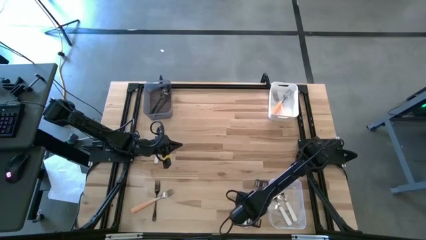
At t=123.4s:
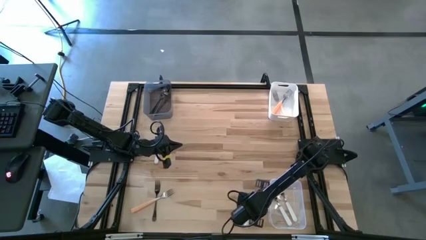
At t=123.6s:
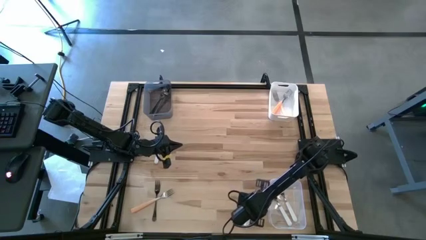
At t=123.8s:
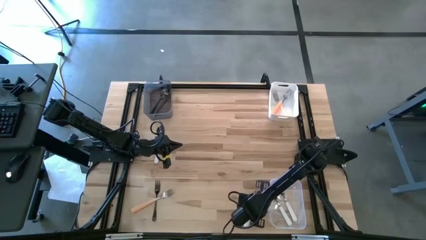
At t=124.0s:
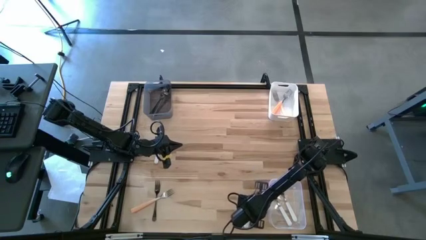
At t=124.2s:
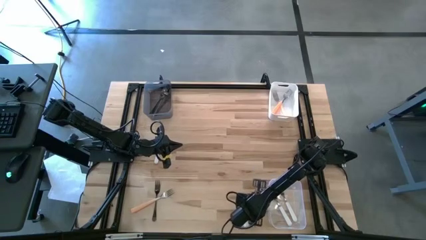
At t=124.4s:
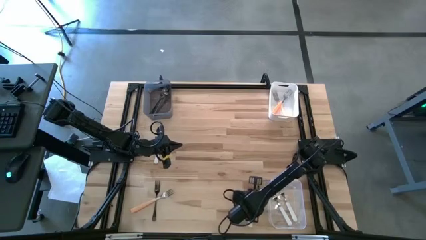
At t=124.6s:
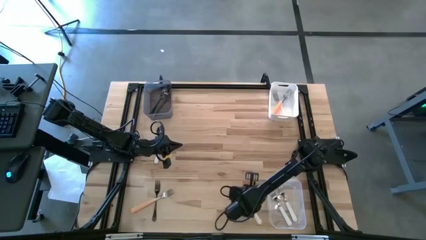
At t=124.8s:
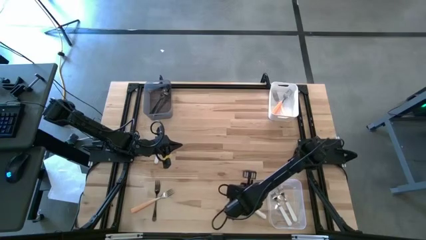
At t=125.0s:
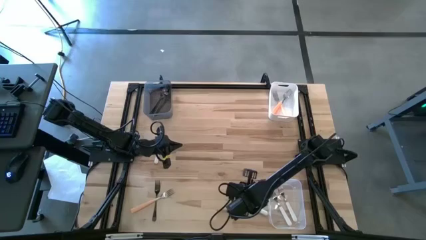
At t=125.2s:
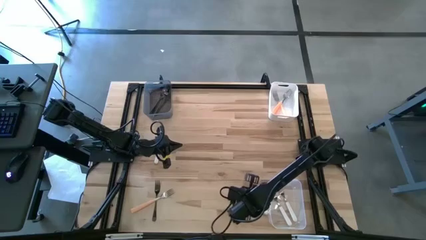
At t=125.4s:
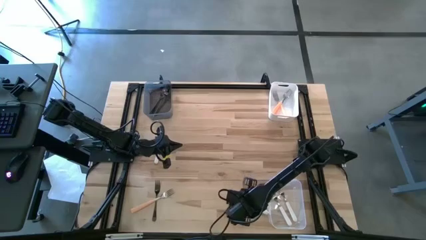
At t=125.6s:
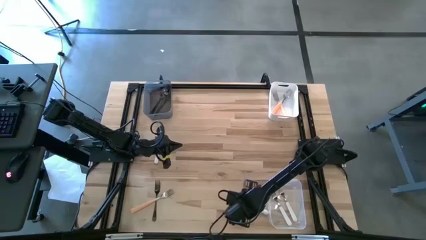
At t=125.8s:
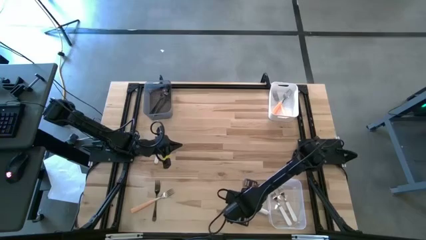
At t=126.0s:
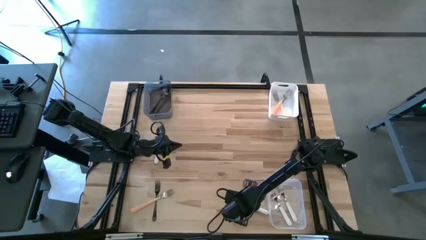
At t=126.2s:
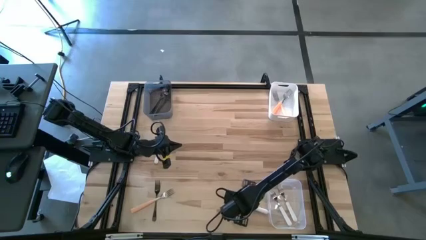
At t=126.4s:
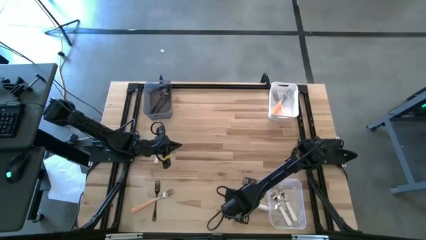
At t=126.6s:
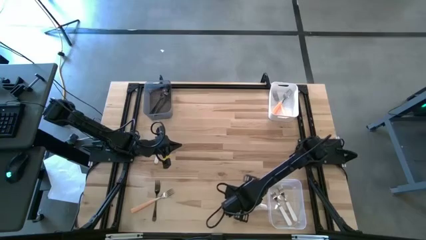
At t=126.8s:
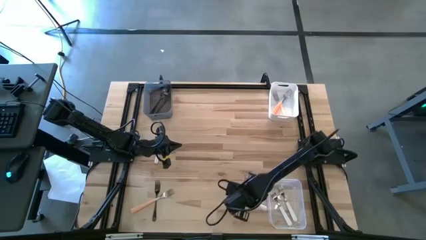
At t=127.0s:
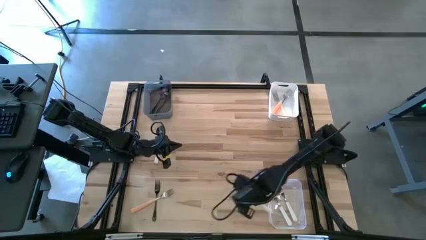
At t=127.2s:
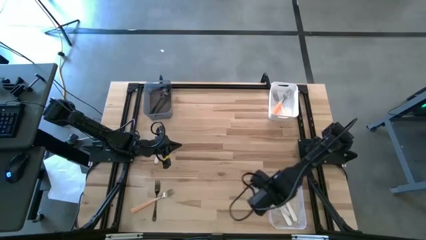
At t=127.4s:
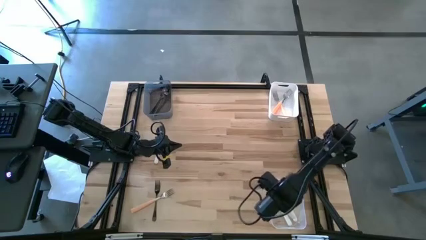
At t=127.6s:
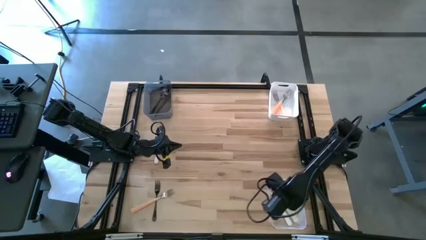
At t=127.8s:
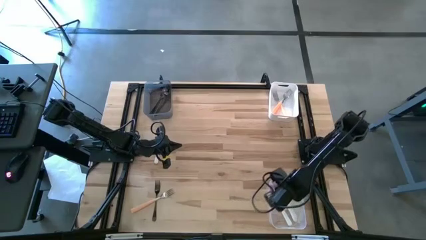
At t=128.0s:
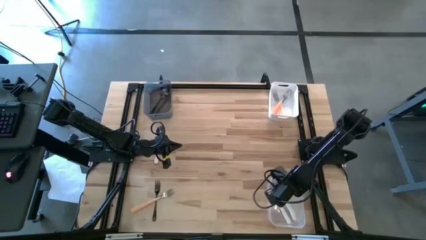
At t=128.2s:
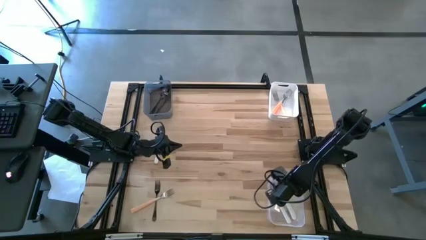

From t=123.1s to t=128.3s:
Task: Sort silverware by color (type)
Put the bottom white fork into the transparent bin

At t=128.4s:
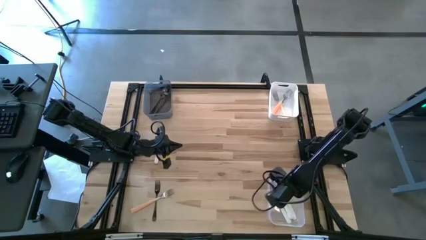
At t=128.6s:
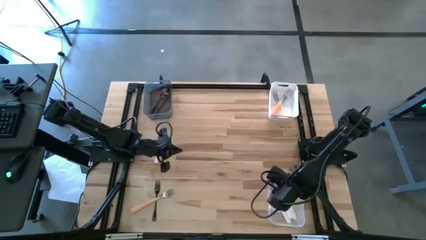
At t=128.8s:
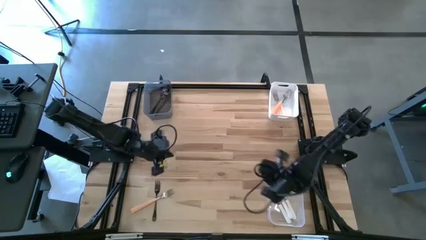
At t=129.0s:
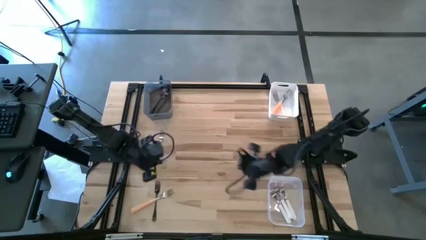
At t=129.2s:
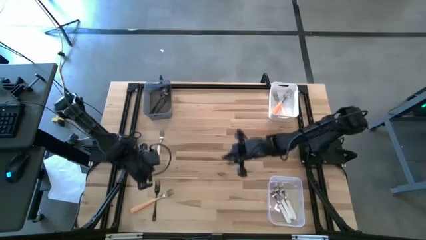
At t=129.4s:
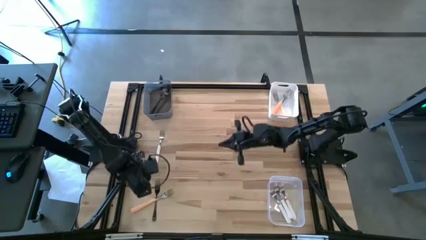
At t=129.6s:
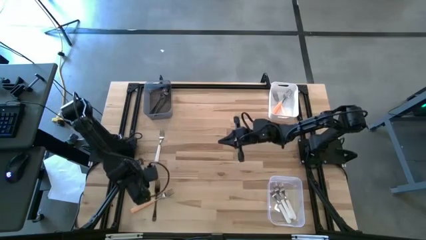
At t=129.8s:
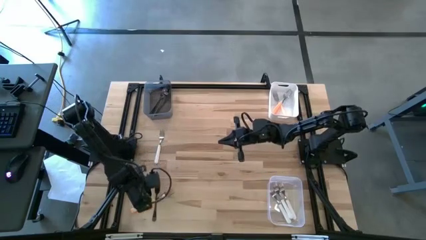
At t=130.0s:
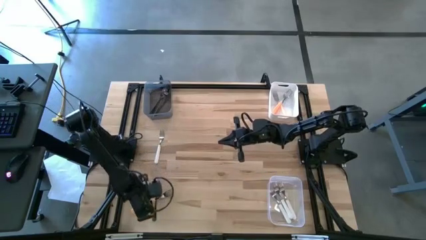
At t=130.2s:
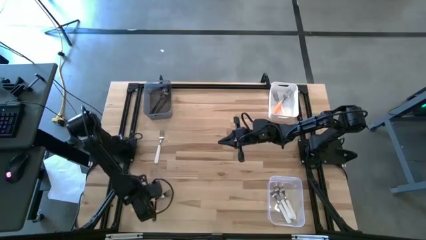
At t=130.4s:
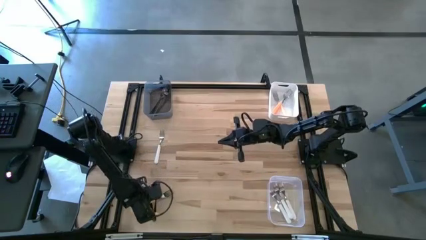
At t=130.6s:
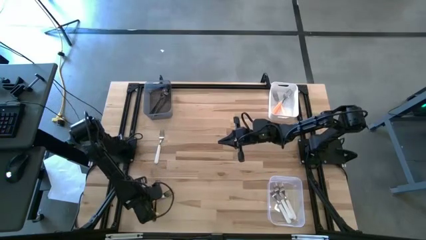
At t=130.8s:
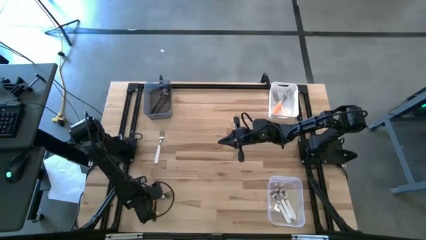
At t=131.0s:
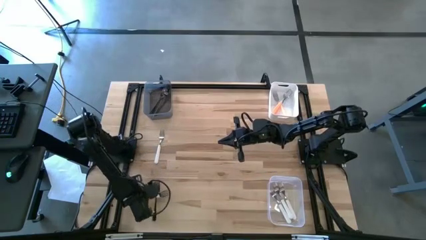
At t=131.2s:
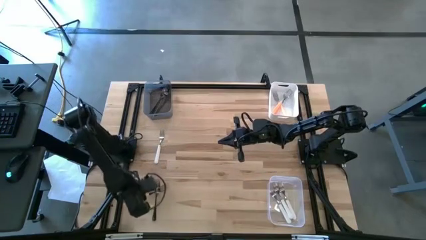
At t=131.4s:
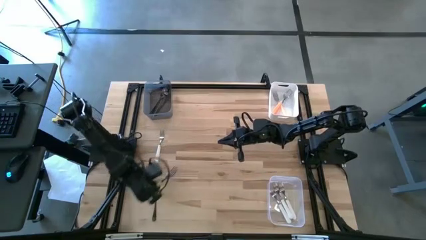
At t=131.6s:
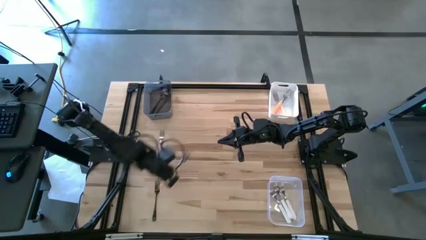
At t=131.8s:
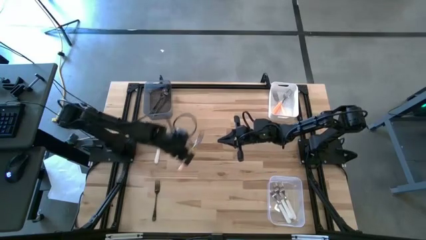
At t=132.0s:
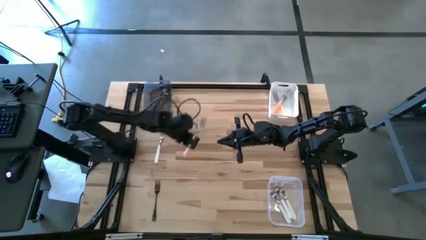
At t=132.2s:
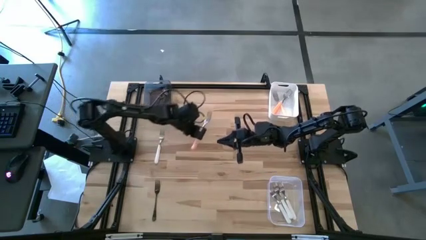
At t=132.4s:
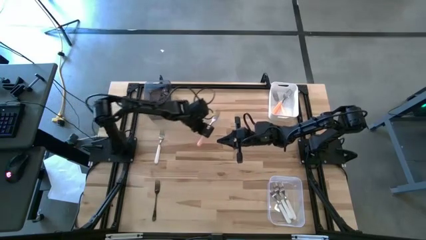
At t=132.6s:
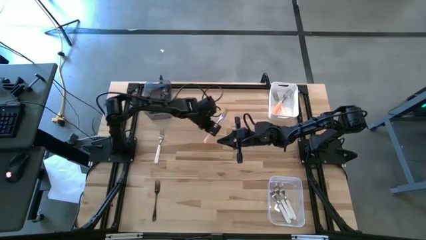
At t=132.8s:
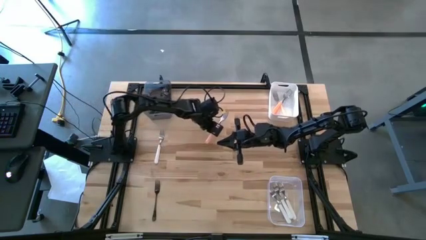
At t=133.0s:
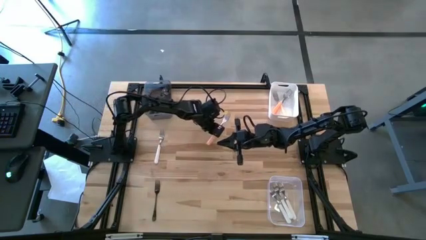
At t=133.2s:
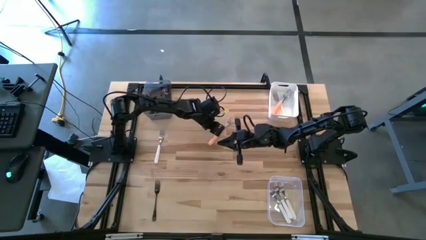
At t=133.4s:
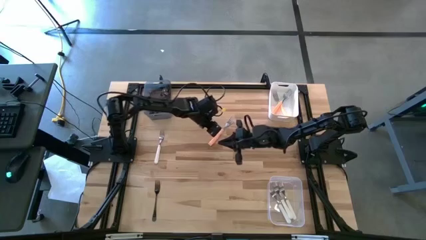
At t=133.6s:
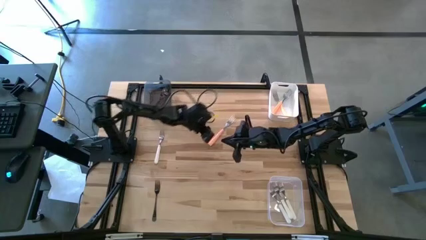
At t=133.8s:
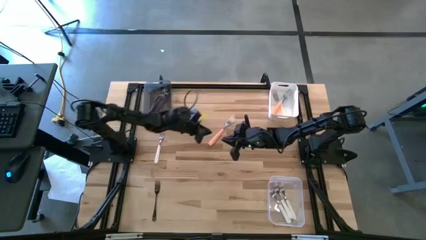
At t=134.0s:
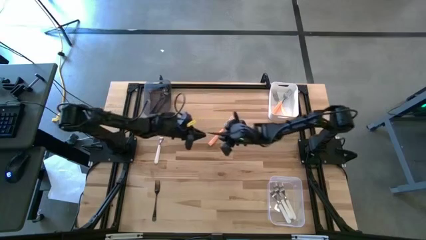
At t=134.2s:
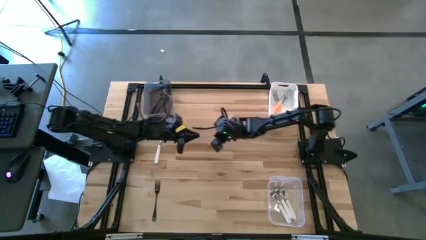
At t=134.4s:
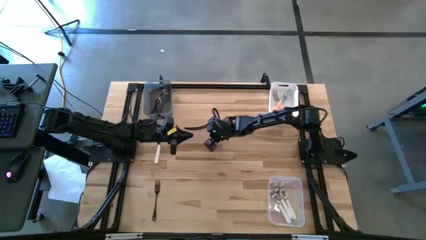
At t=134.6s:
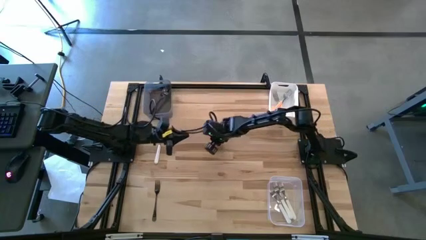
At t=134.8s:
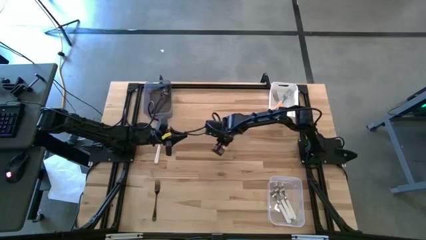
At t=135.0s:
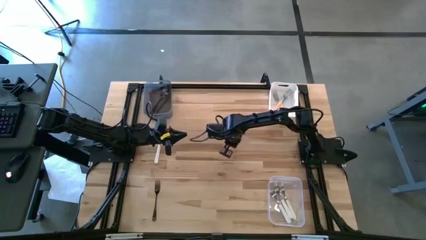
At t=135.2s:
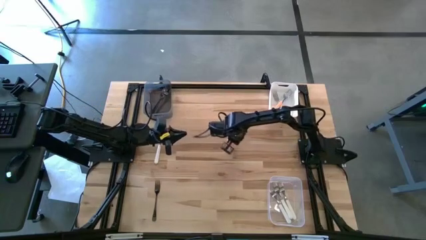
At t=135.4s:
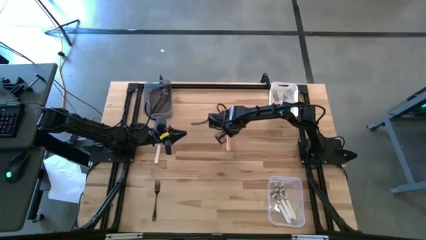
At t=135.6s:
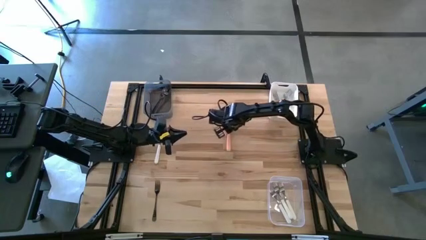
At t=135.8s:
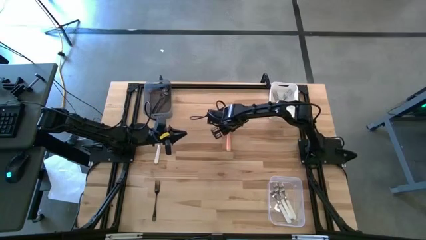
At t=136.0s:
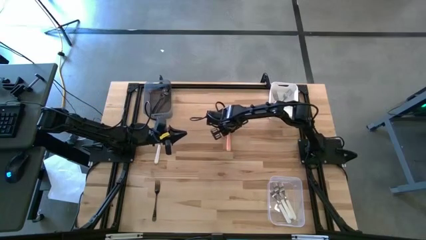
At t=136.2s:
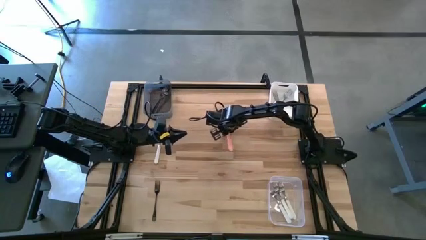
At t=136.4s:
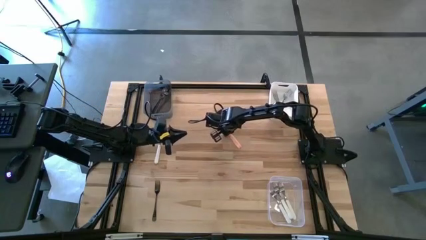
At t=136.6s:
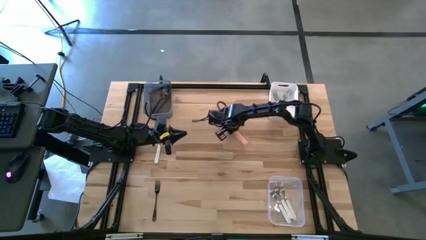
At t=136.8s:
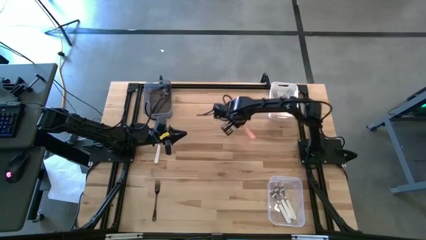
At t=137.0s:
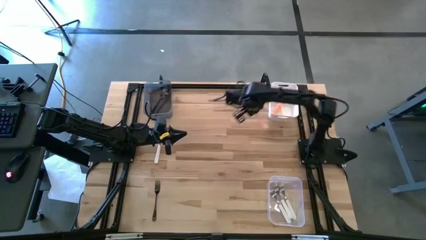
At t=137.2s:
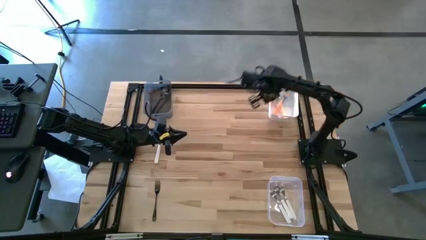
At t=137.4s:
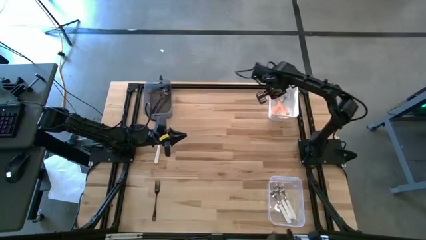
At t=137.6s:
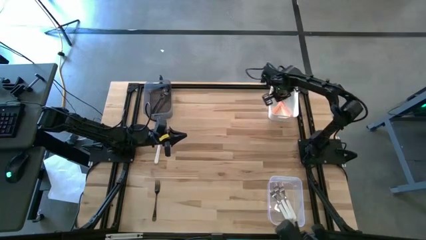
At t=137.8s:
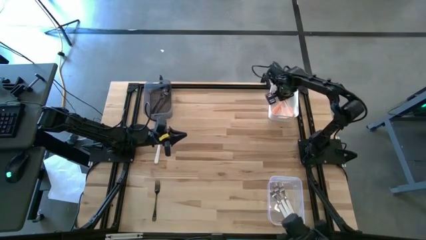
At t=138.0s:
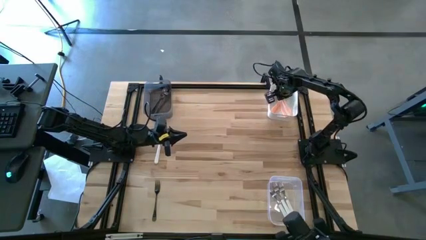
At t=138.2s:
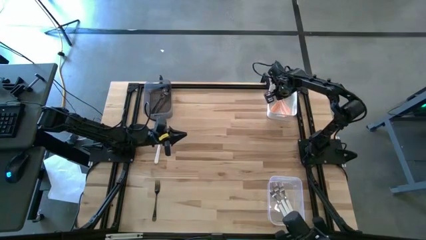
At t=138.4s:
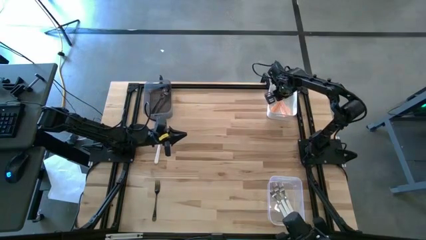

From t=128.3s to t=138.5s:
Put the orange fork into the white bin
